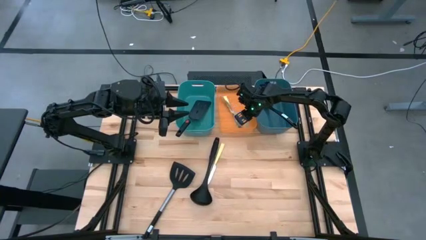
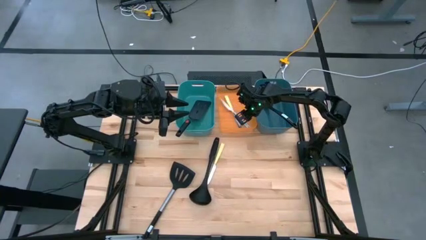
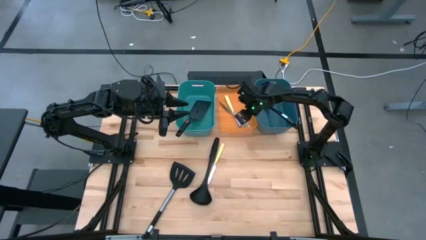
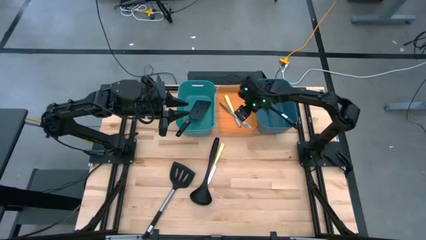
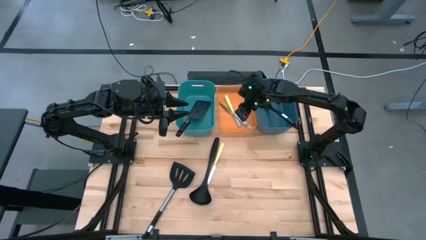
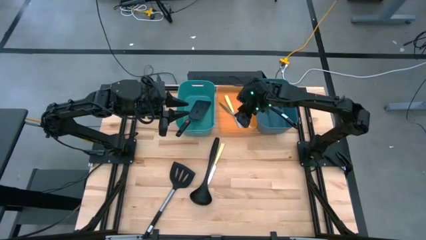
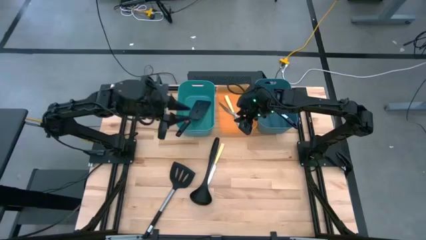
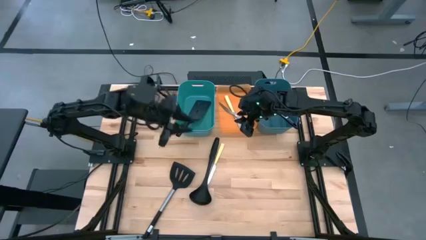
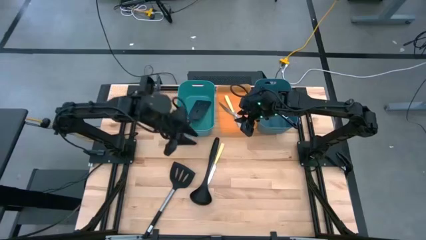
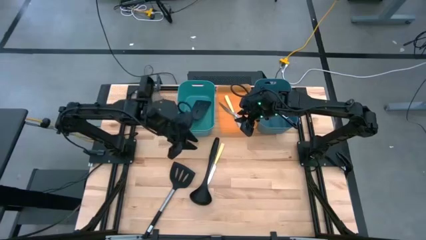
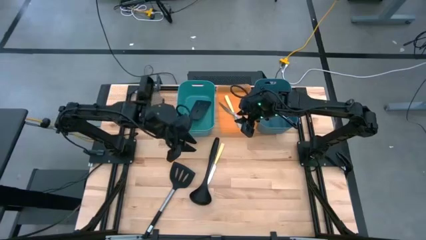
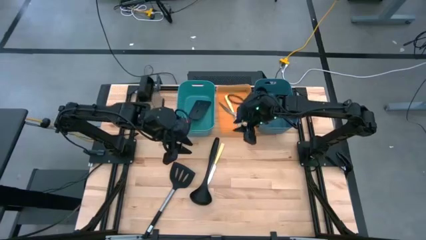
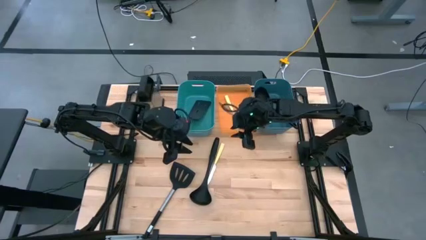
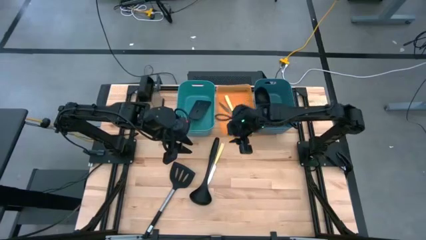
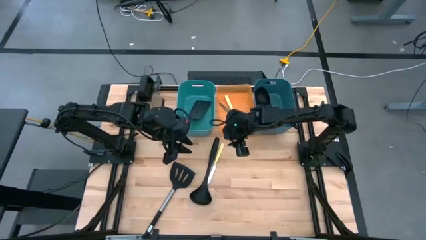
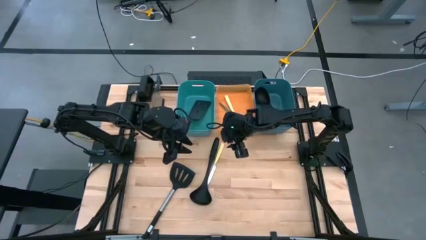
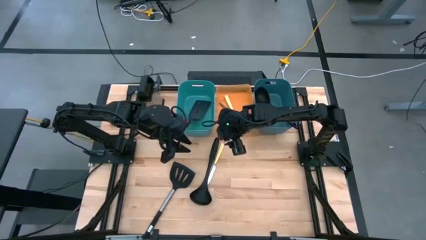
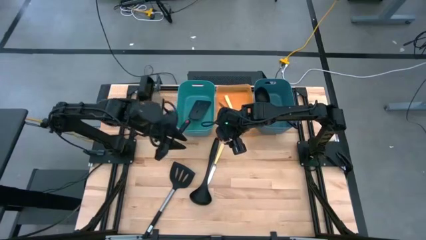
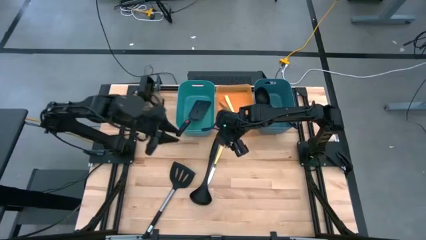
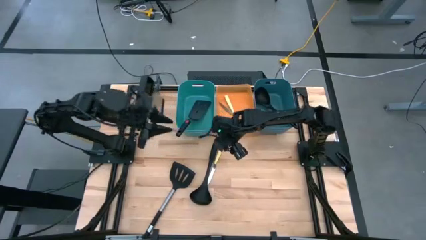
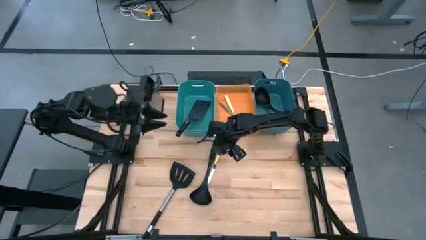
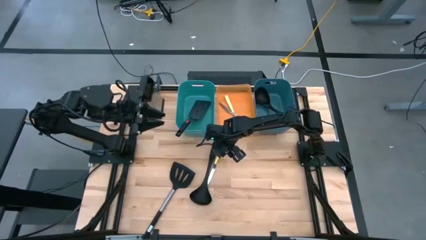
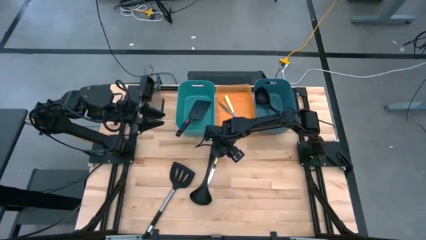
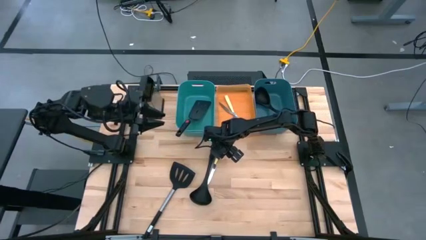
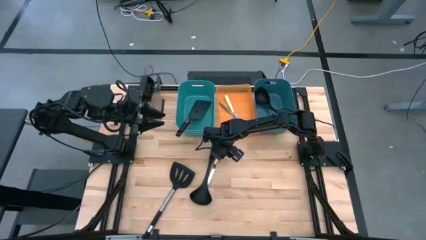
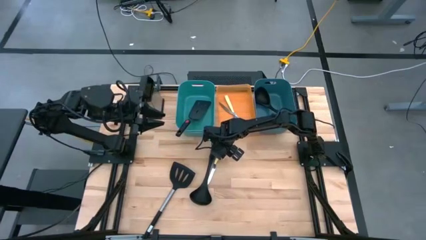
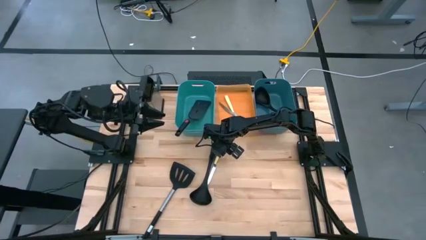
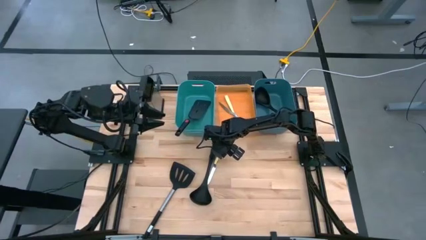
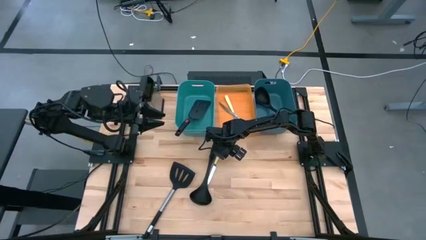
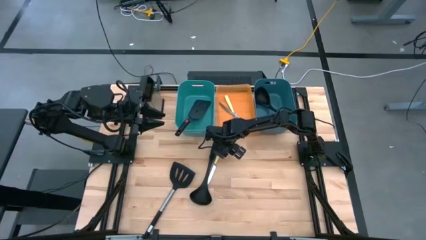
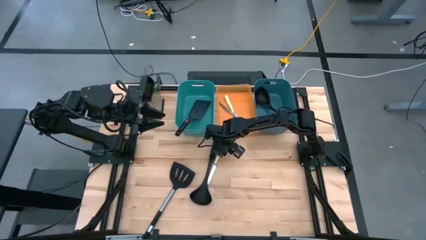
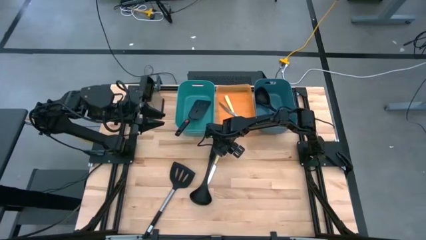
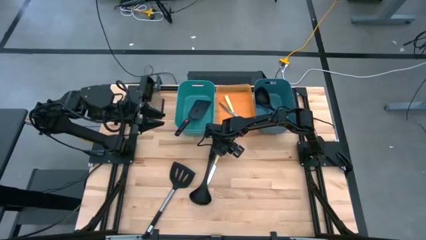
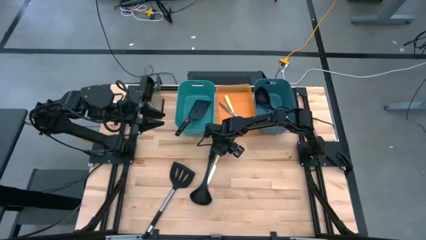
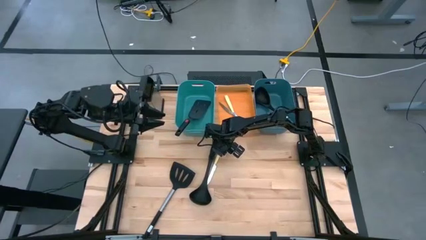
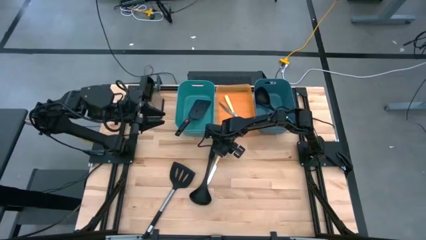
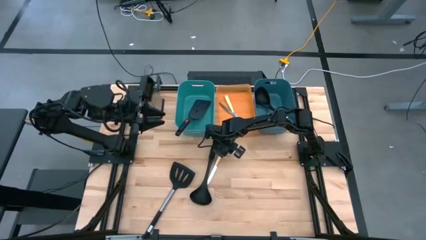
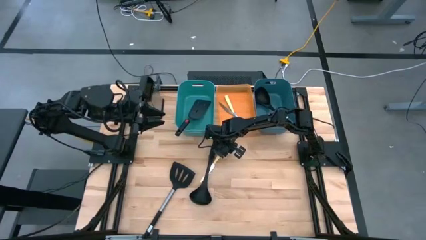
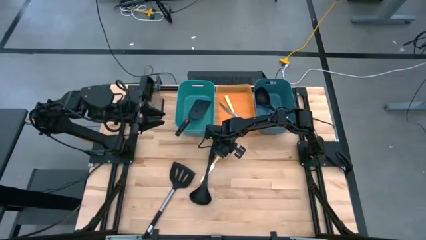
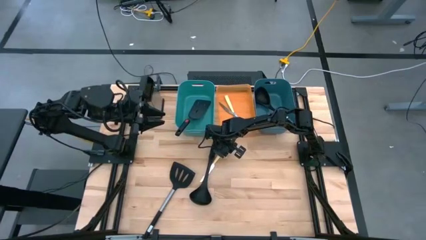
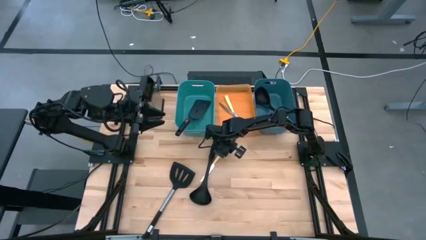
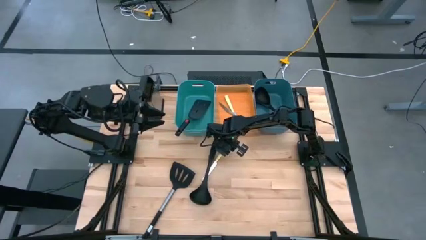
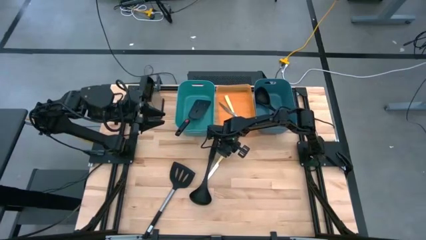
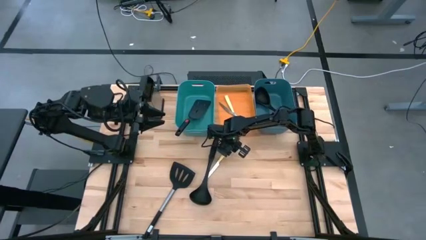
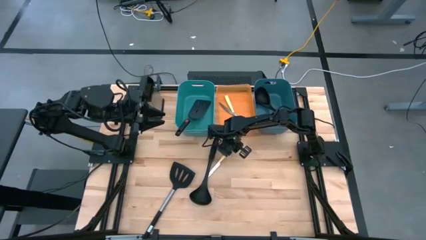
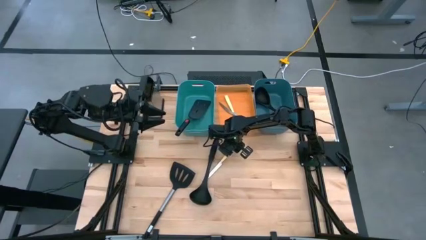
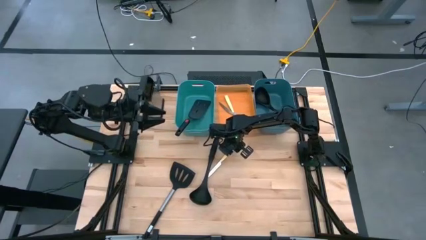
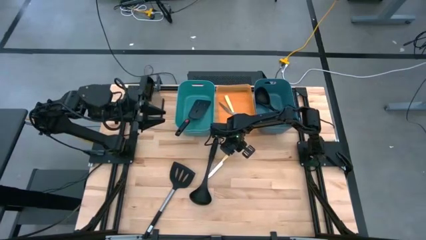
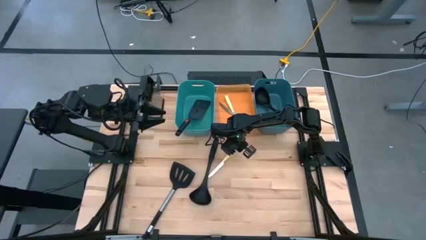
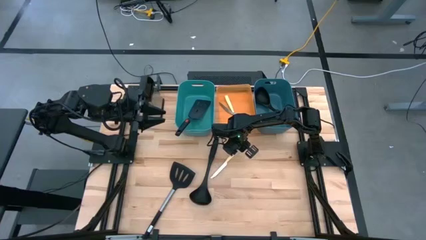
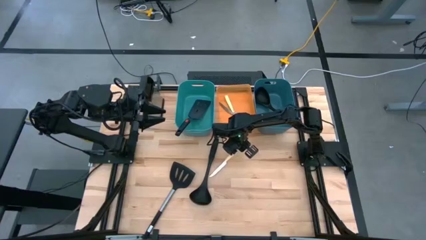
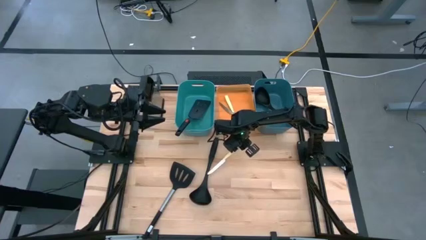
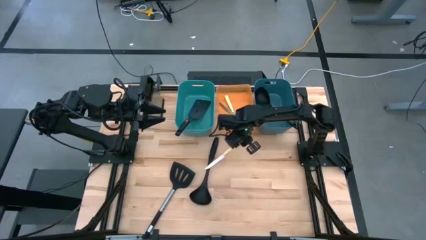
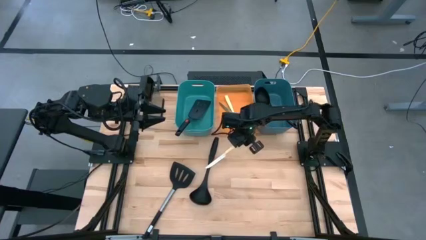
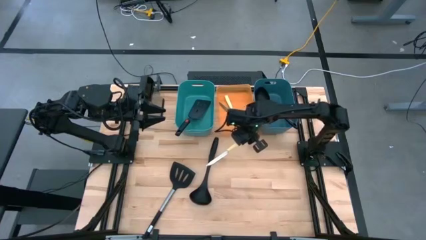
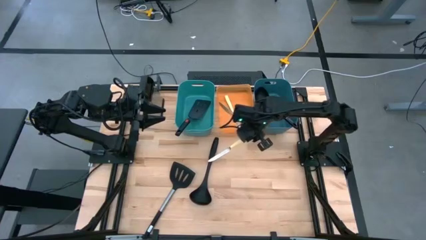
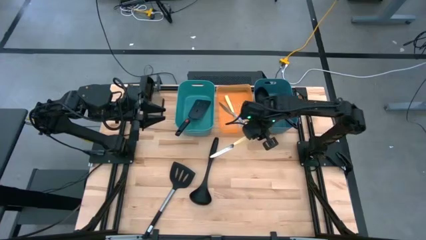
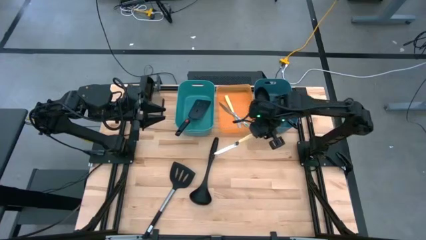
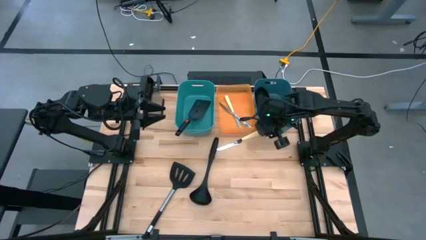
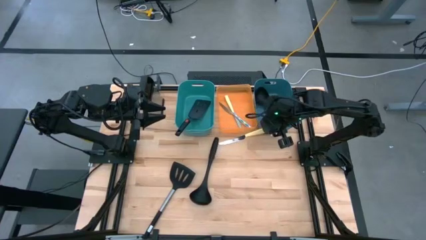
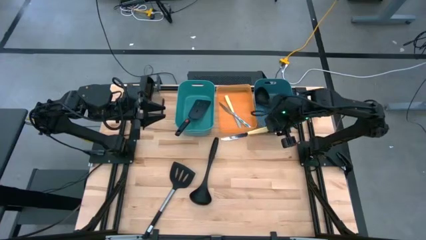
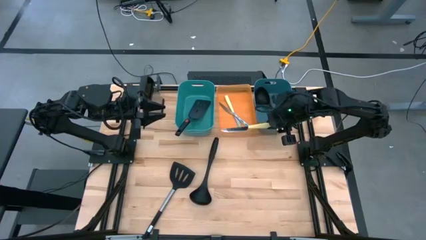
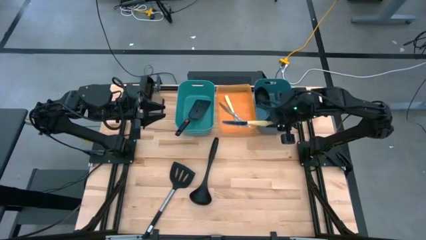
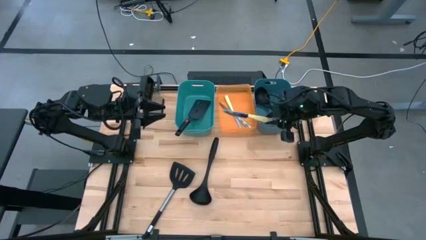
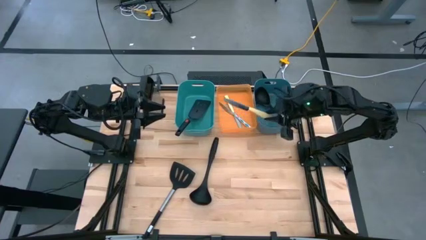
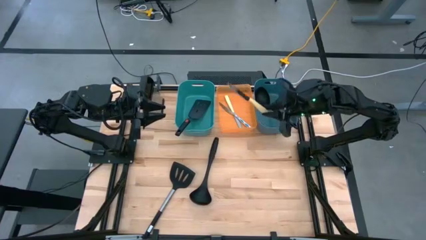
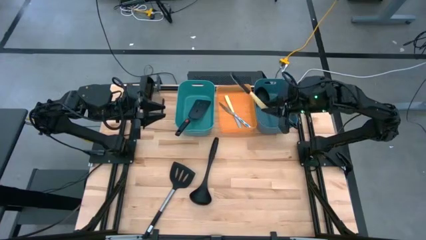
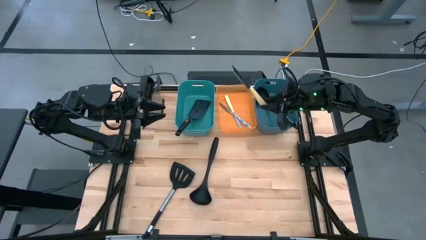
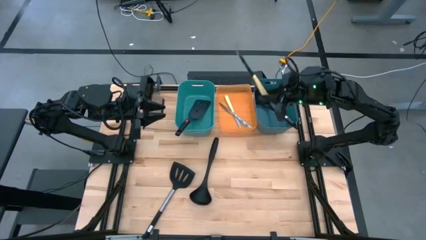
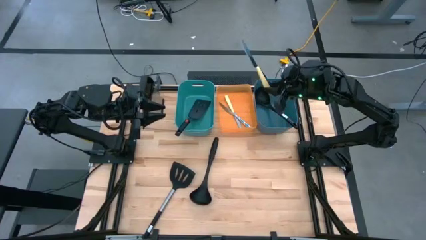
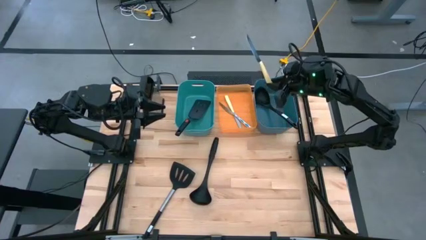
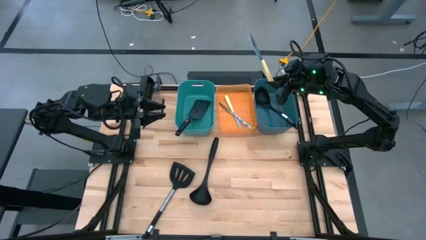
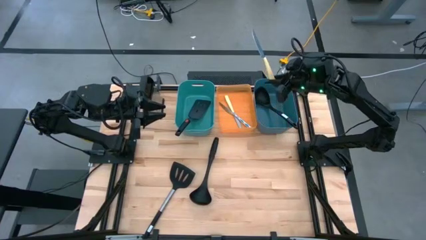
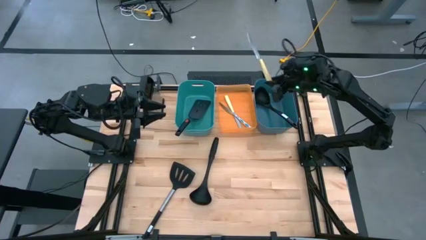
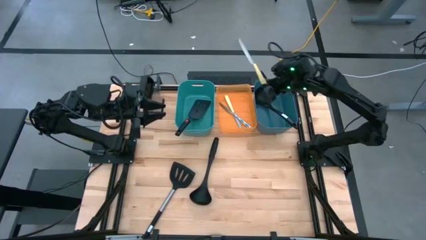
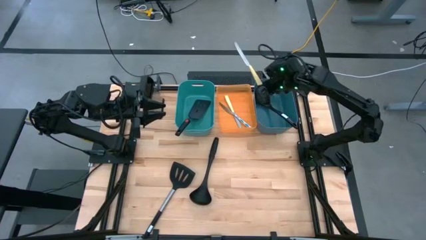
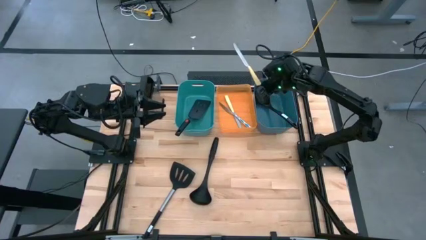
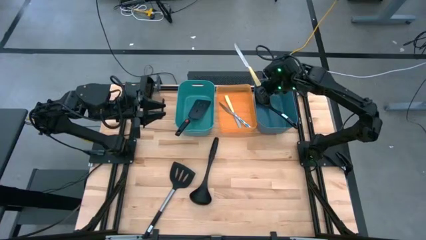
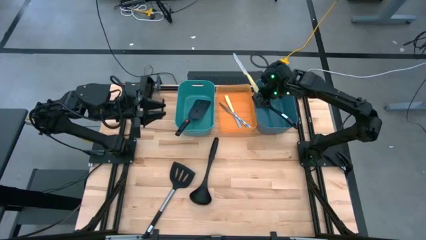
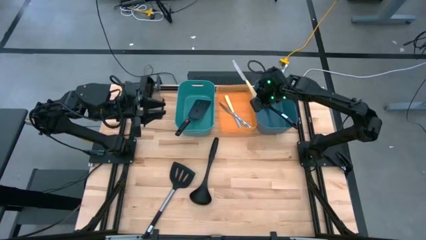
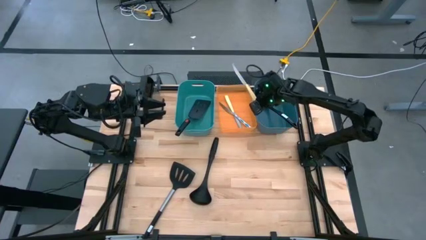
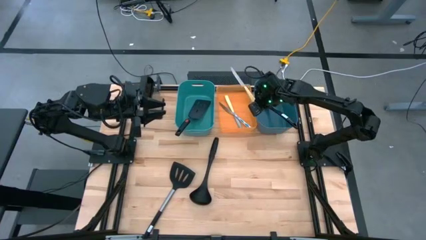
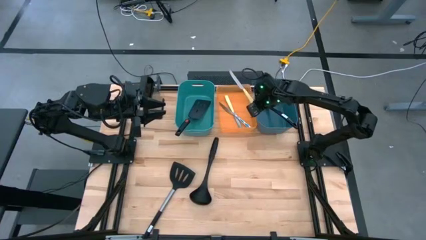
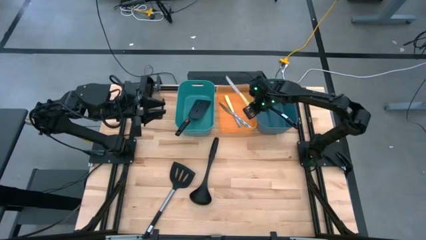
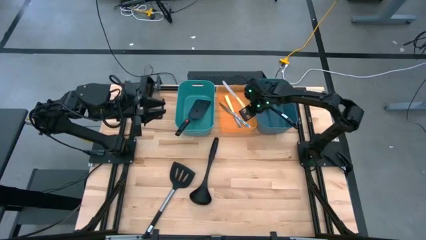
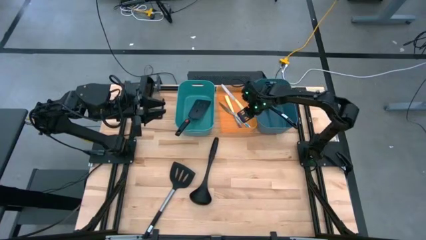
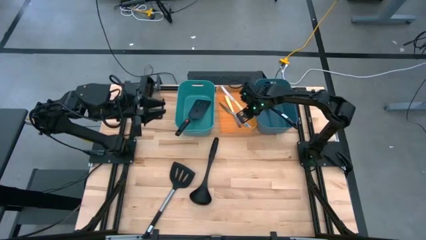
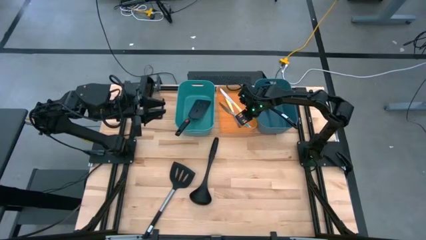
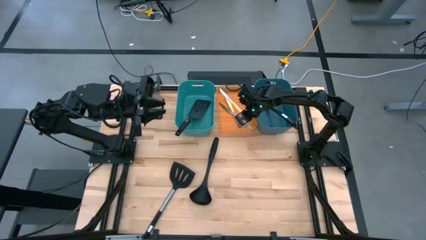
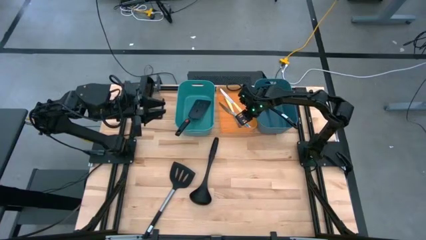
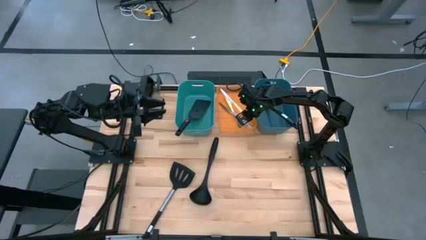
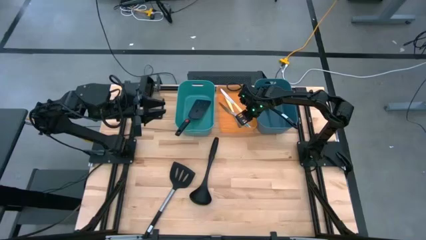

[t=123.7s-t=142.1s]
Task: Pick & Place Kitchen Items
Put the yellow table knife into the orange bin
